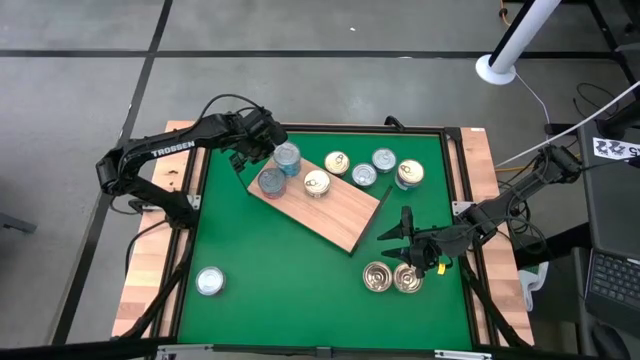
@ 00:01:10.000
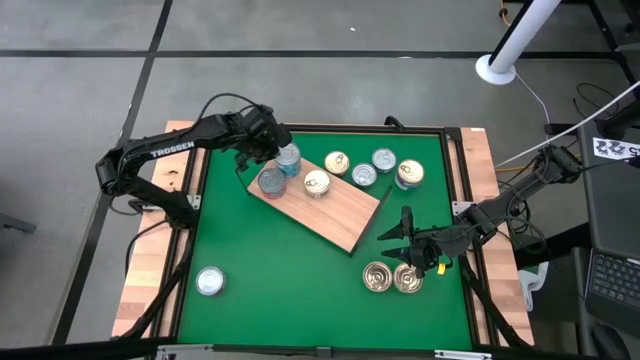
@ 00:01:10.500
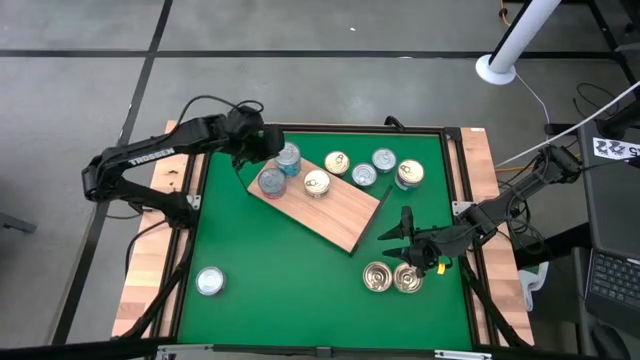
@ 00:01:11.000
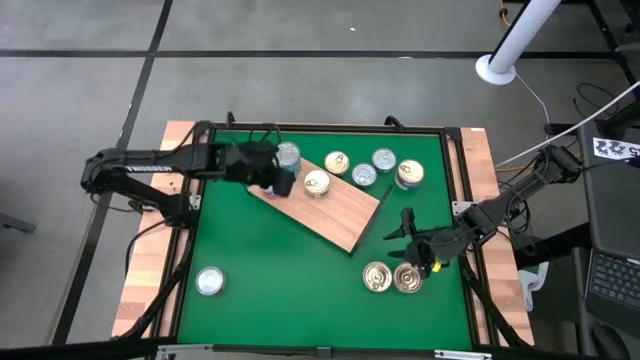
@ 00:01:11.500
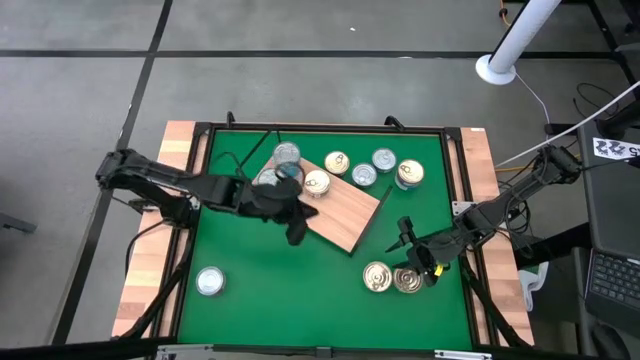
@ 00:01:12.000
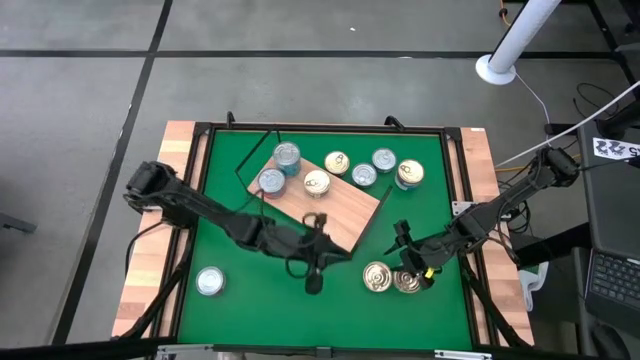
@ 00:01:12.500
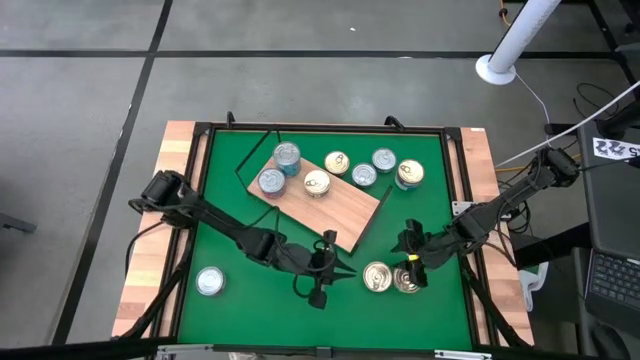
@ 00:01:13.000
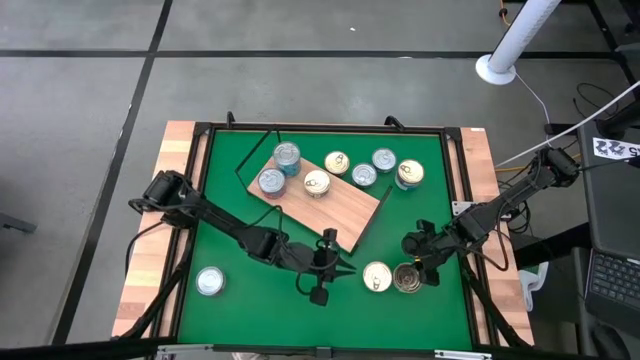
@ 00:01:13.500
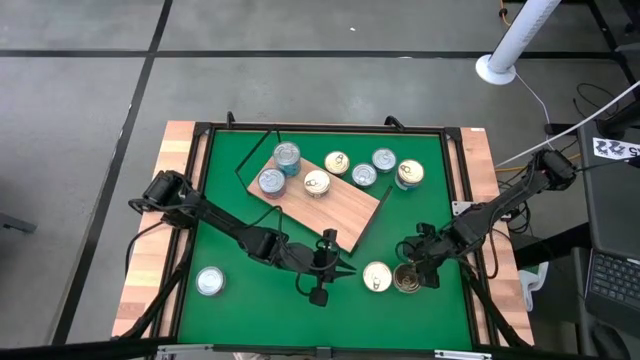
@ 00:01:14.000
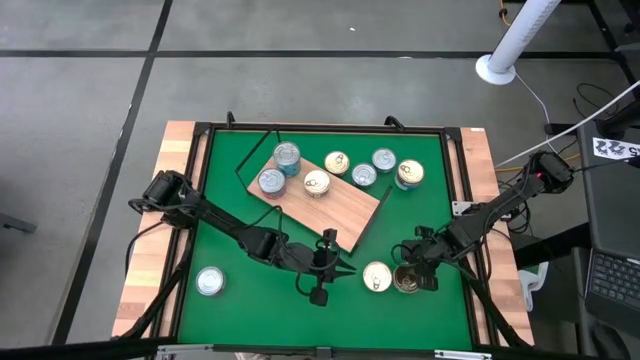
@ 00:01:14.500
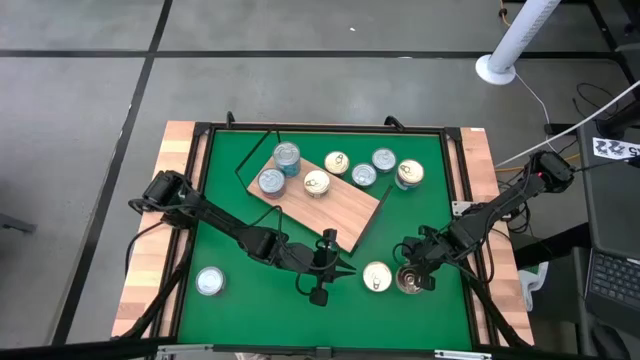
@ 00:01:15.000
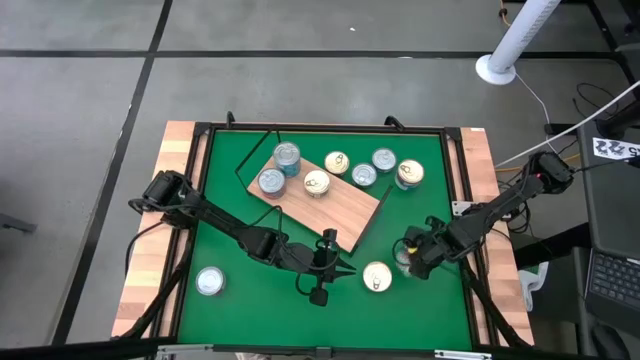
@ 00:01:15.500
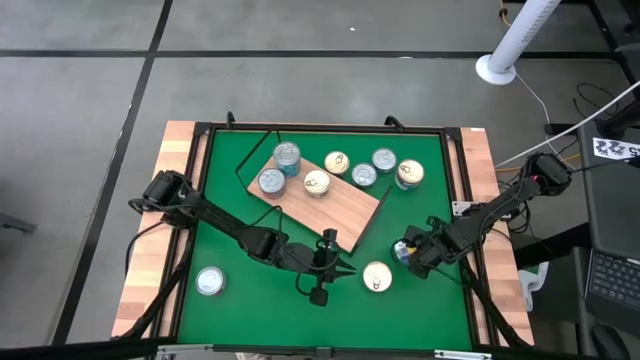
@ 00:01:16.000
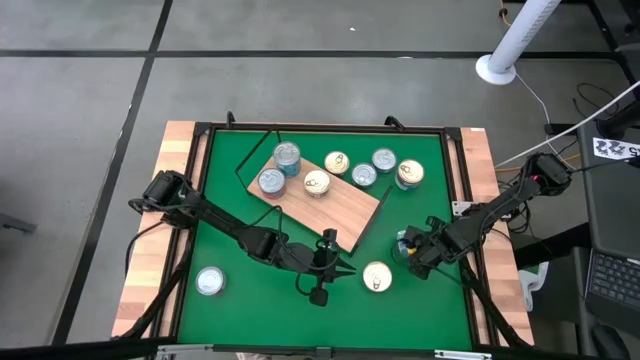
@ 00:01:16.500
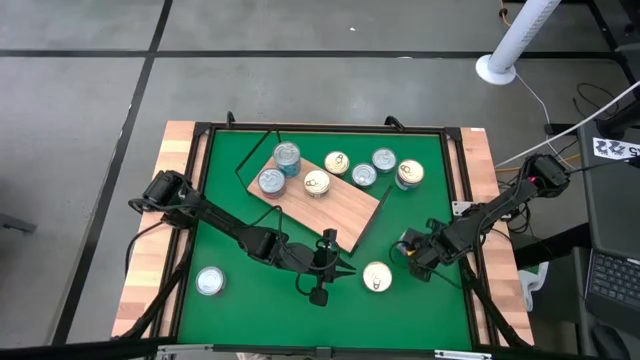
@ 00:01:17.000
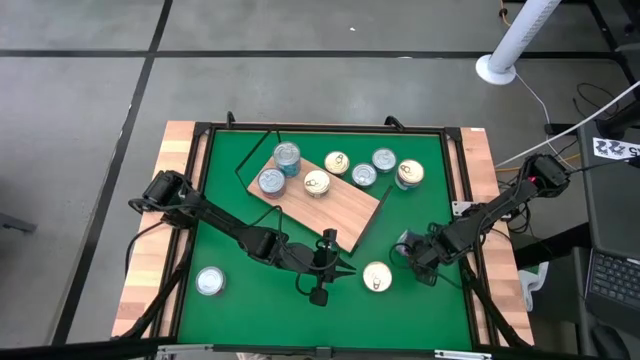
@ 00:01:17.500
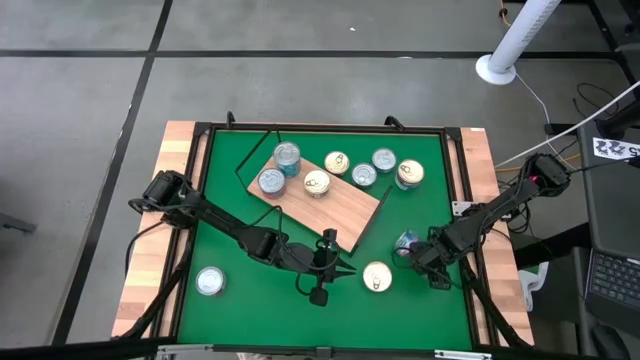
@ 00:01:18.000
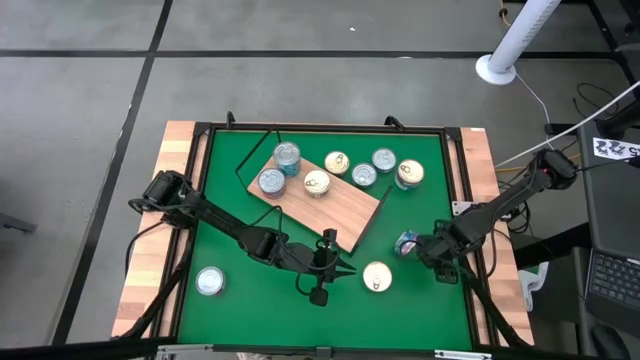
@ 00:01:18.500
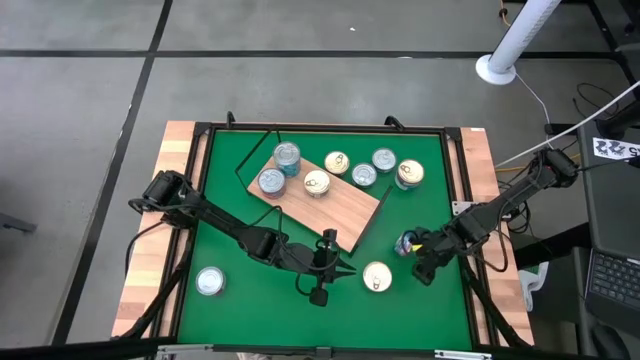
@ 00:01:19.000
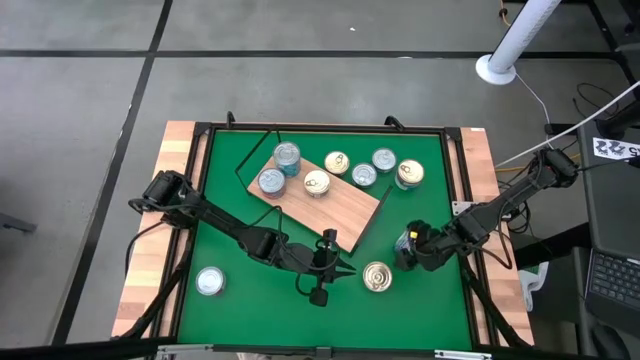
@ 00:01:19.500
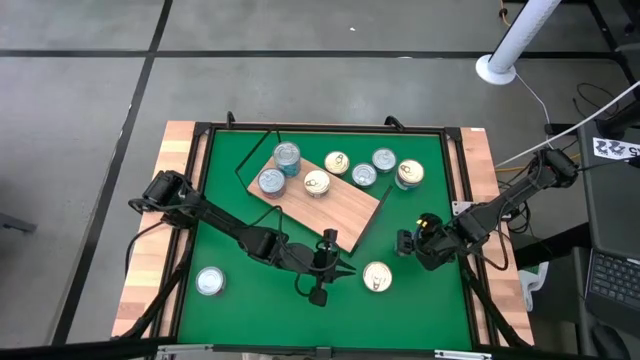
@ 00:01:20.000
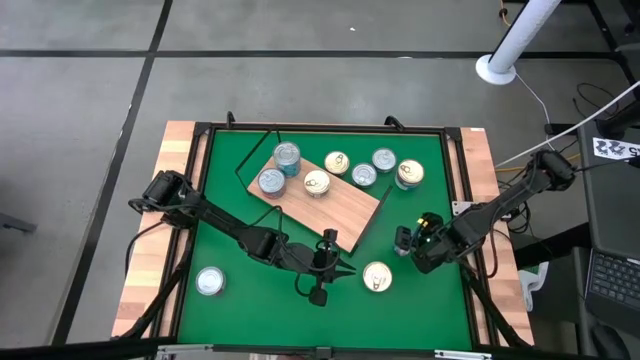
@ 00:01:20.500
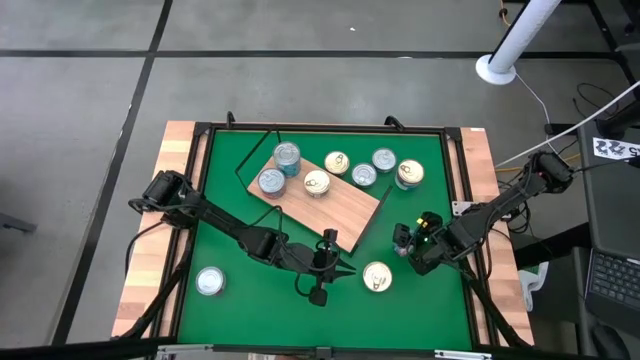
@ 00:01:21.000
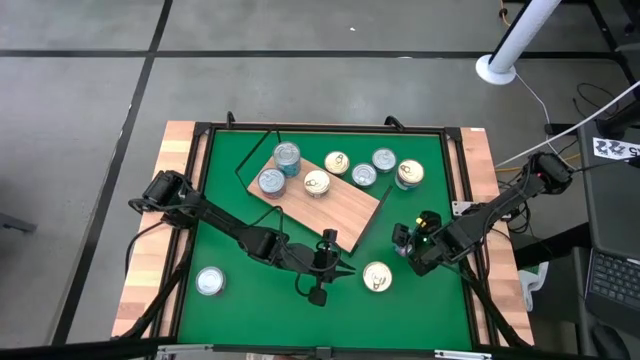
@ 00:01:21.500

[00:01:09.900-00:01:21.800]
Task: Stack canned seafood by type on shelf
Put the blue and pink tuna can on the shelf

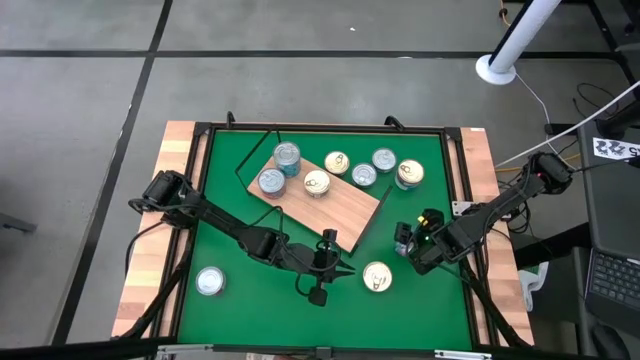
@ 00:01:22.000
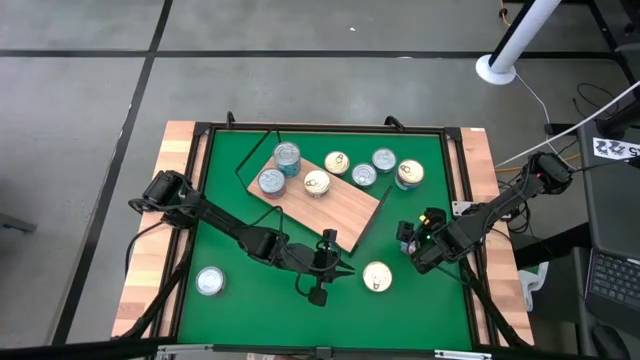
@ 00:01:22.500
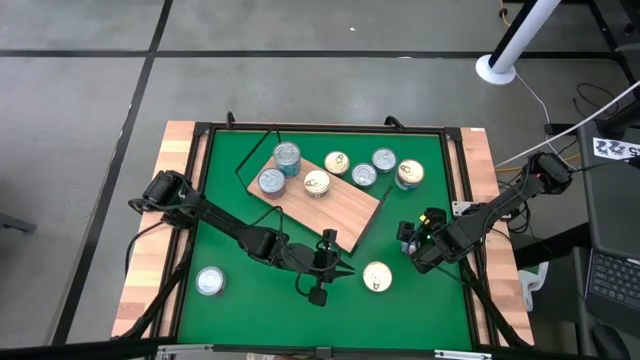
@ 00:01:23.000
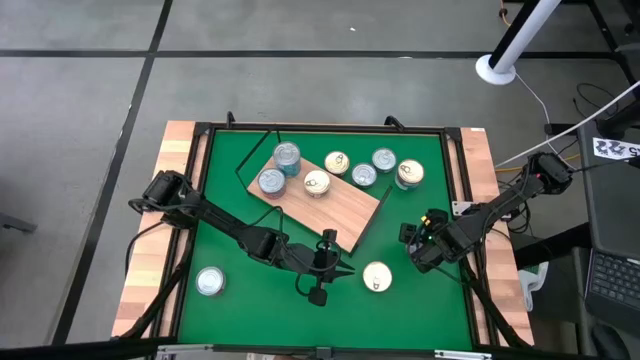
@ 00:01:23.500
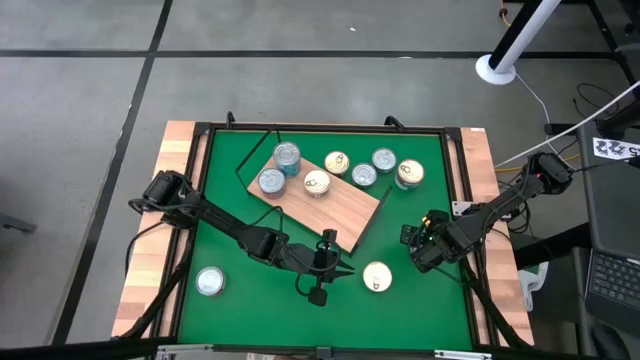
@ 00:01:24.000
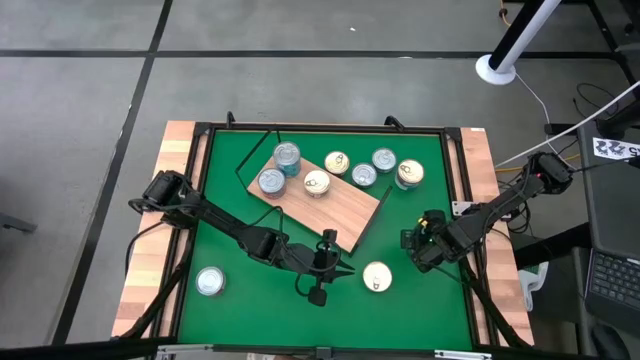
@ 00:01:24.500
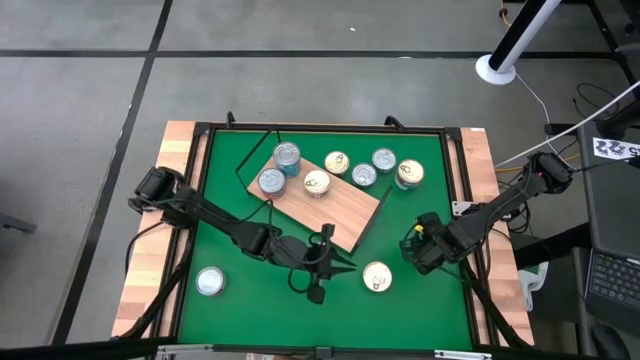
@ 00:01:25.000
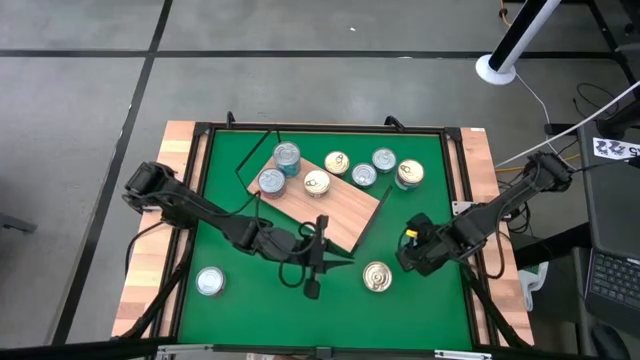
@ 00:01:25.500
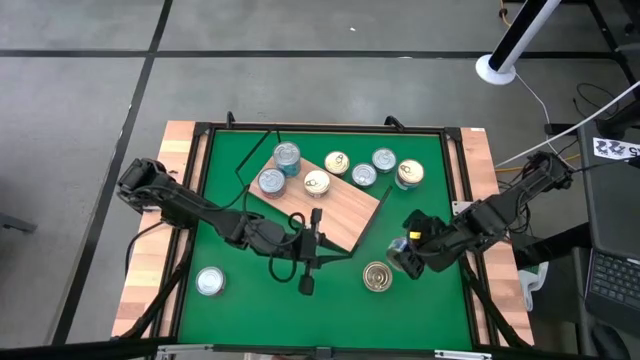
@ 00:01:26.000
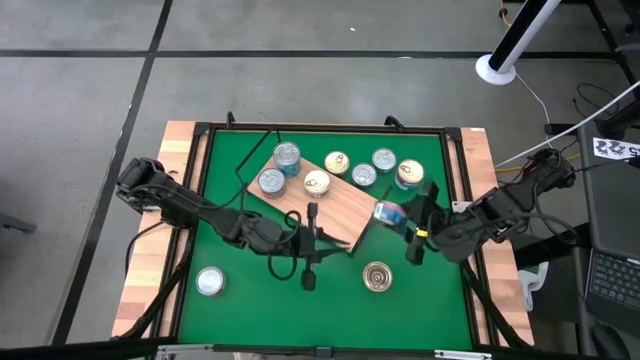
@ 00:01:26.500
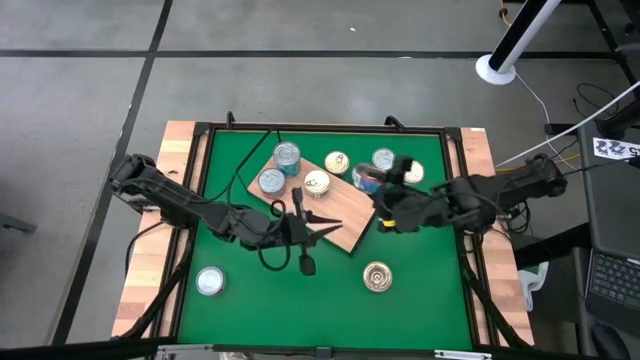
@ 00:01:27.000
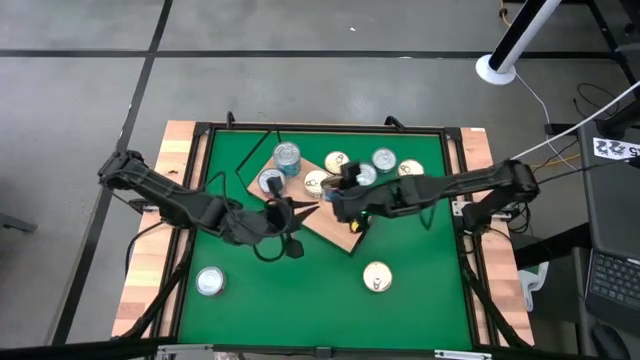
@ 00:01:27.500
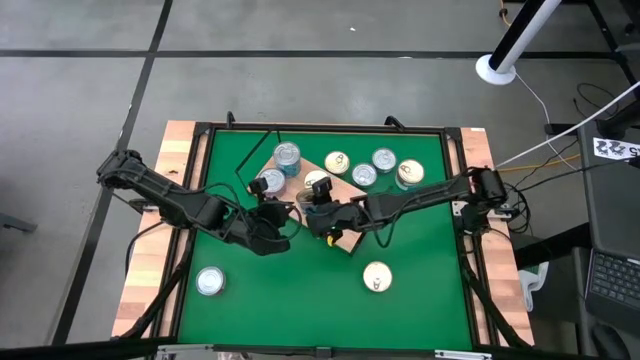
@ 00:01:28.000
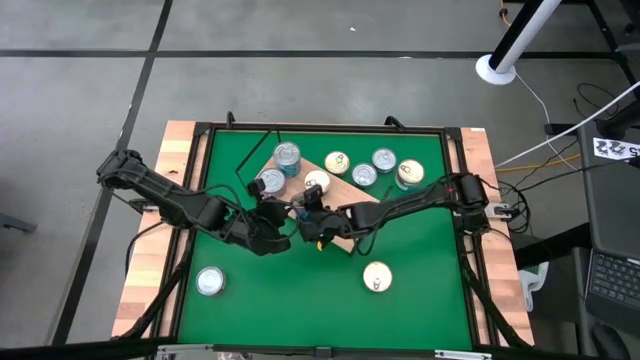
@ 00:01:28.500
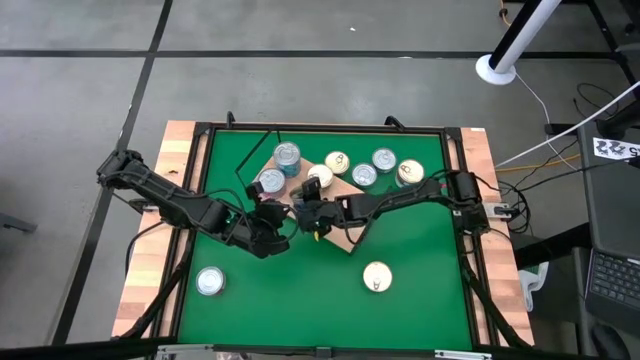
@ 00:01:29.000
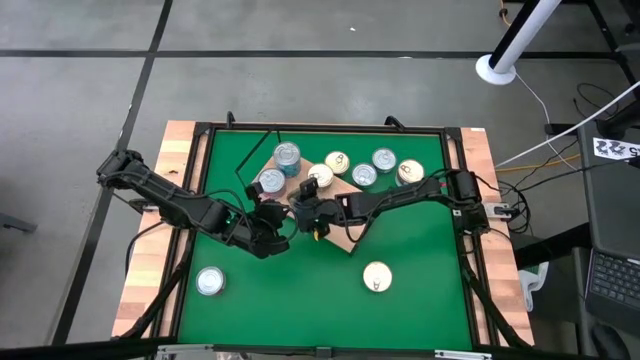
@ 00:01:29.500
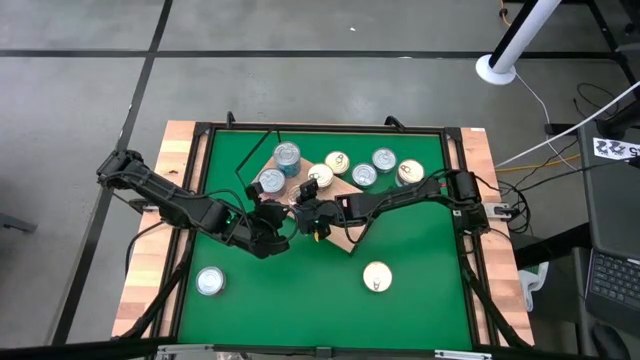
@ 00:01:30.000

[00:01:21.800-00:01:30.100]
Put the blue and pink tuna can on the shelf aligned with the other blue and pink tuna can
